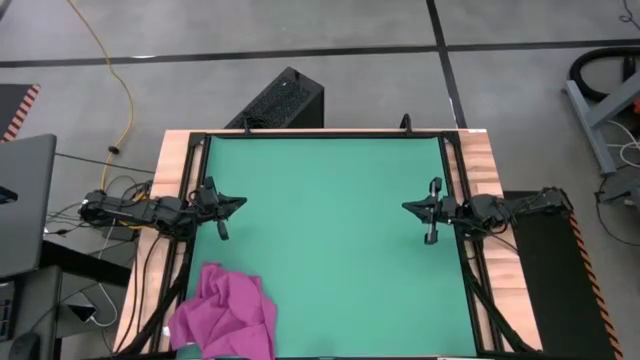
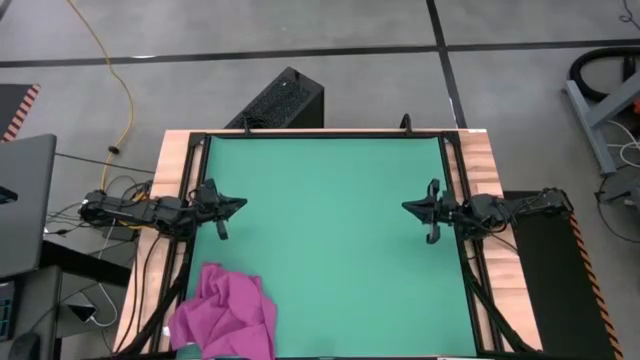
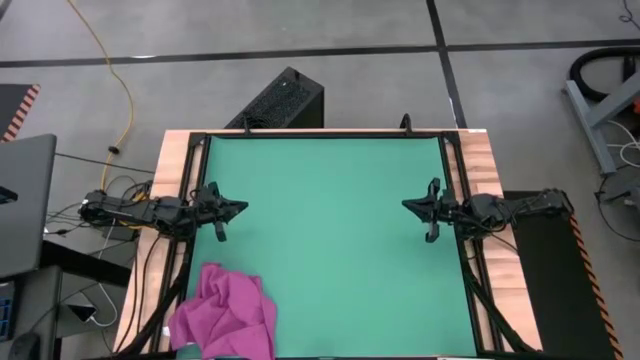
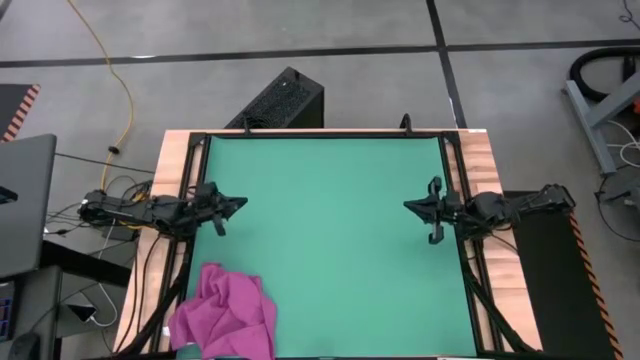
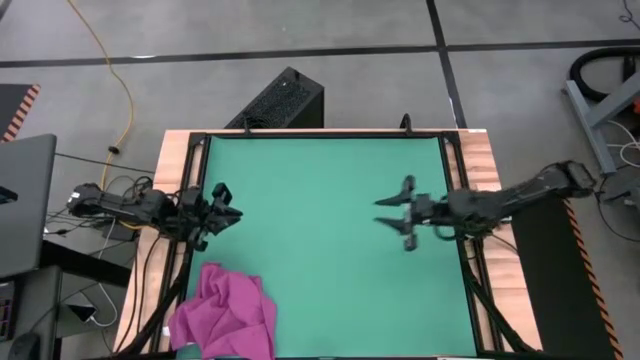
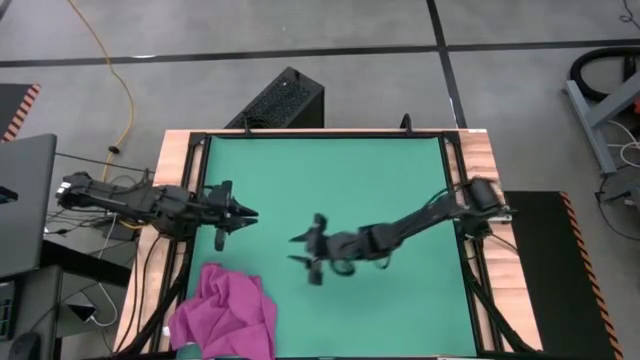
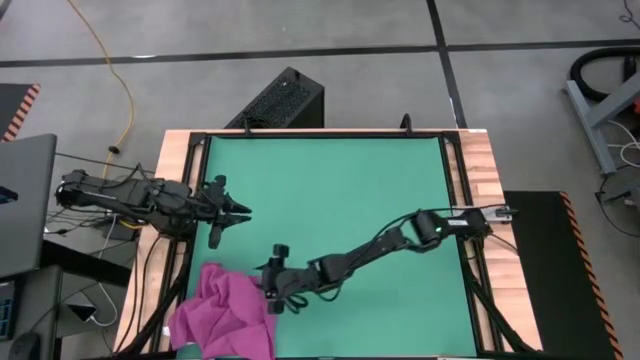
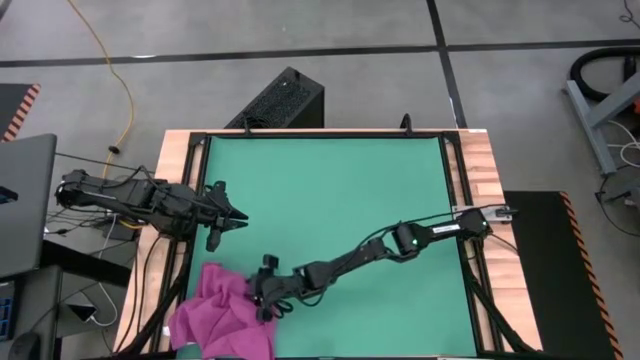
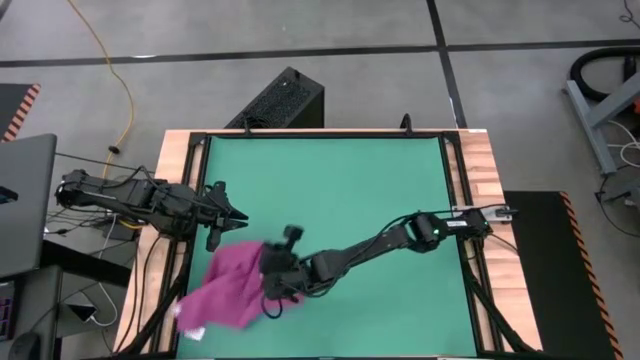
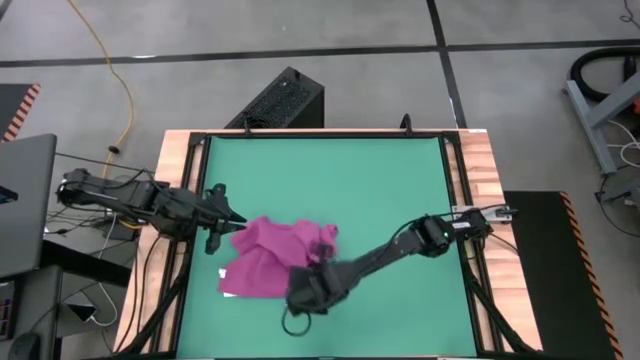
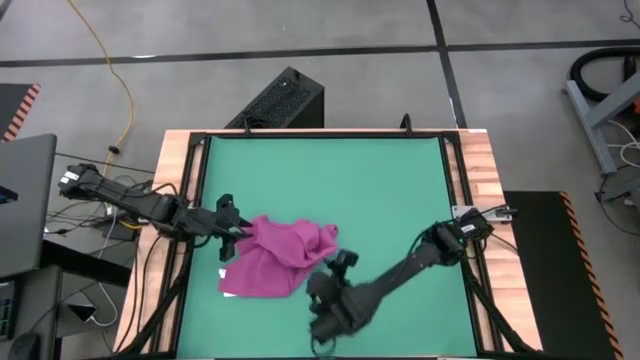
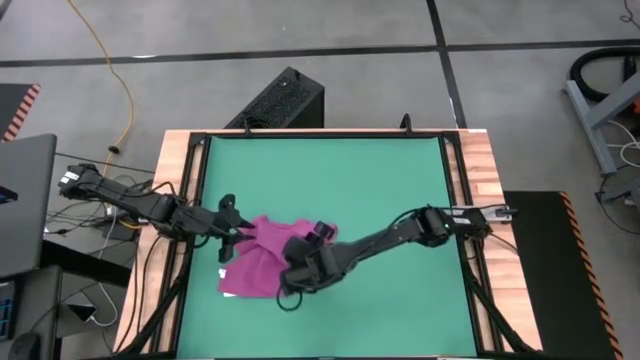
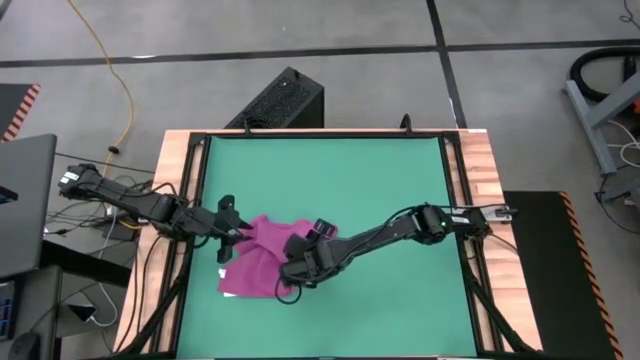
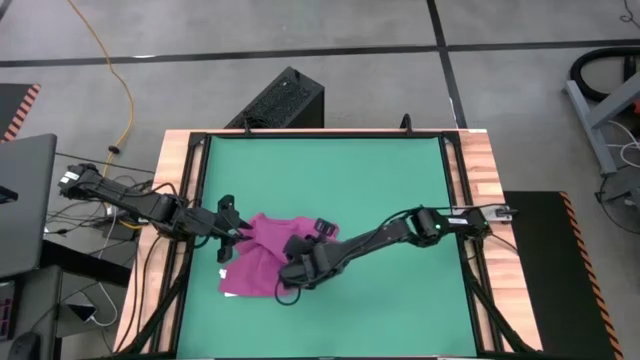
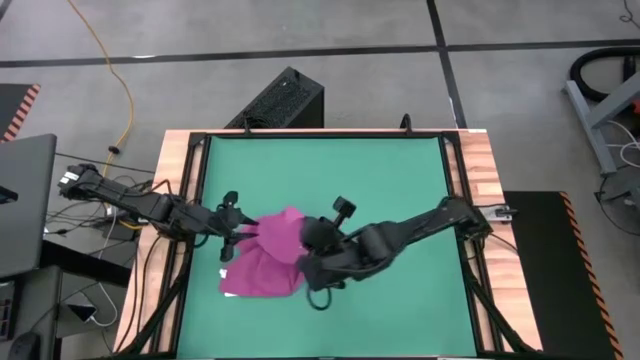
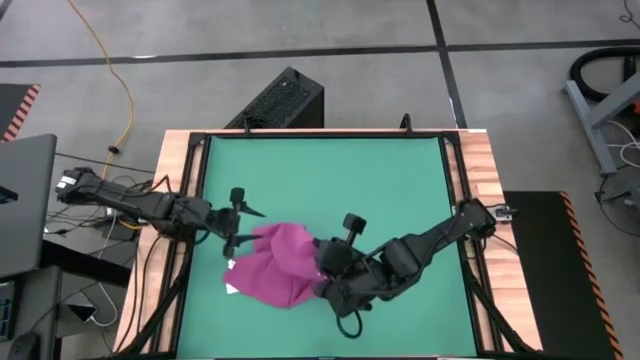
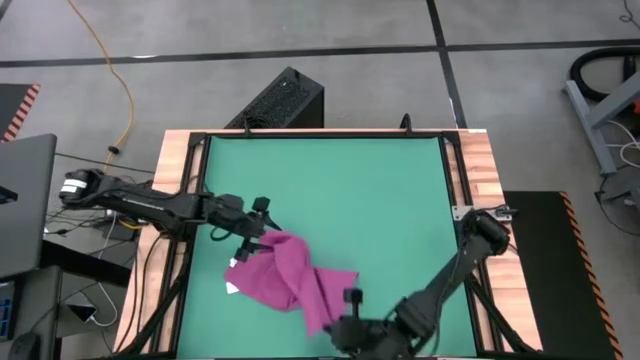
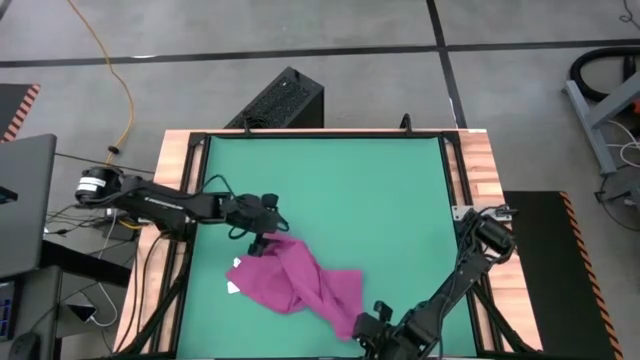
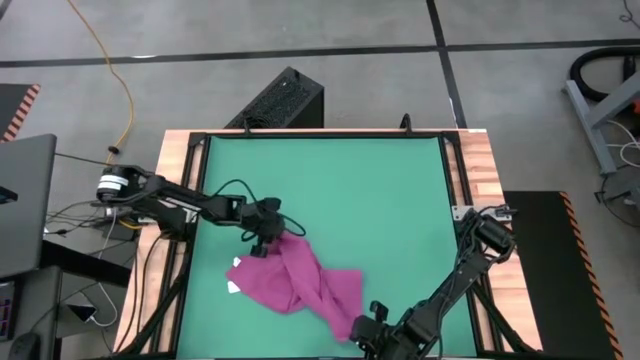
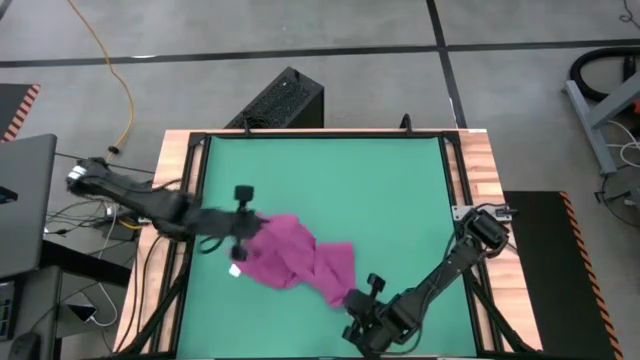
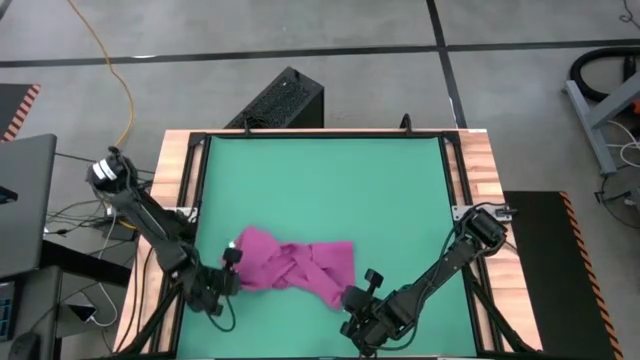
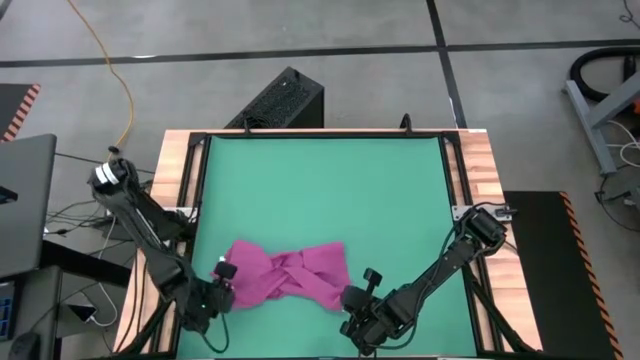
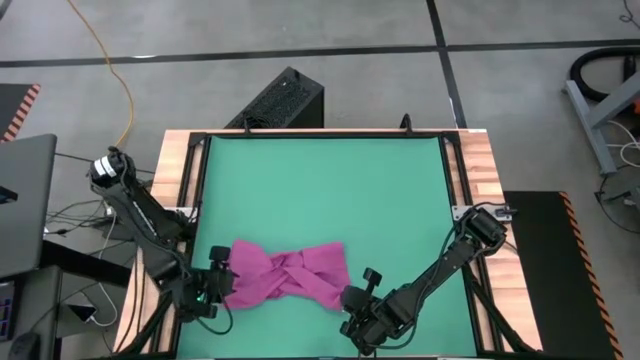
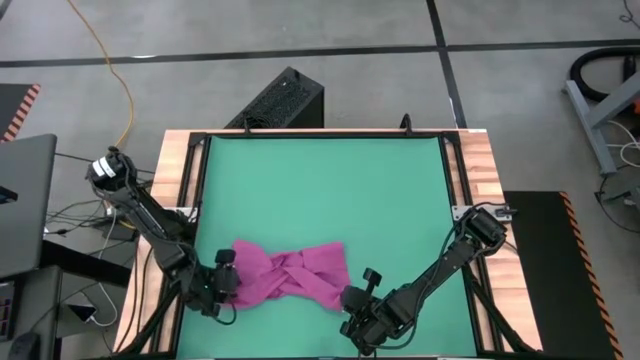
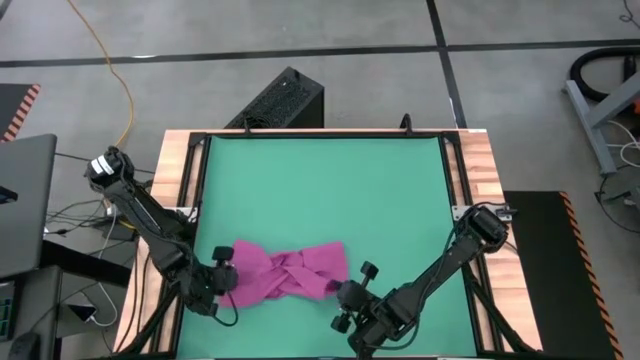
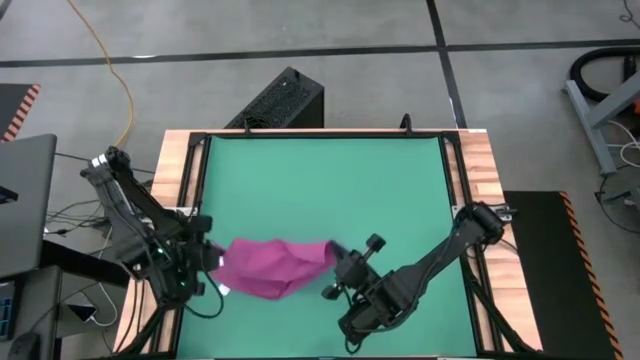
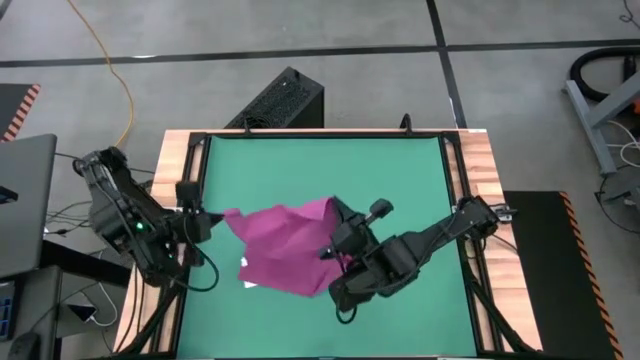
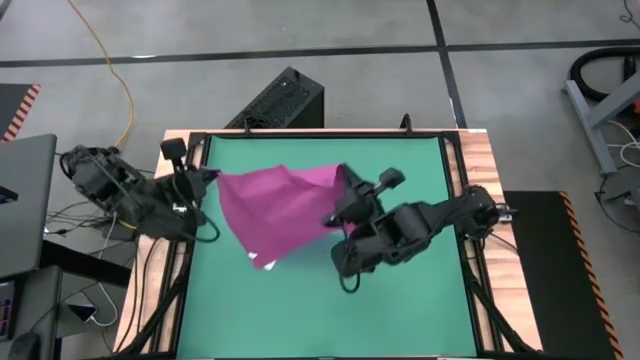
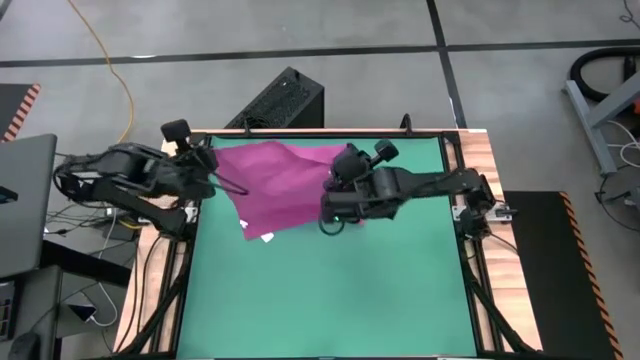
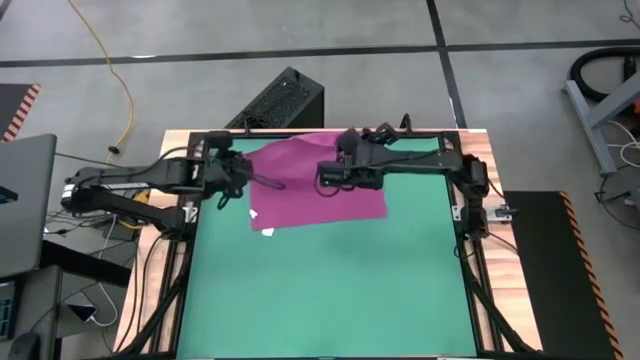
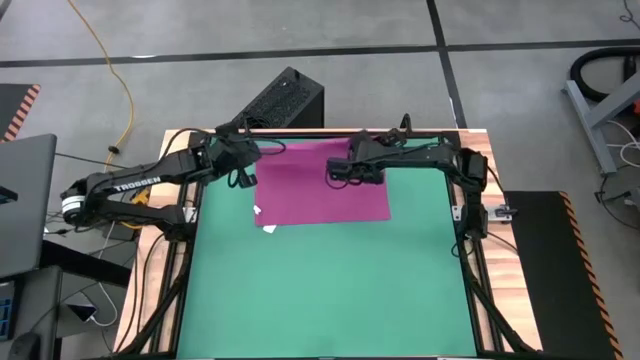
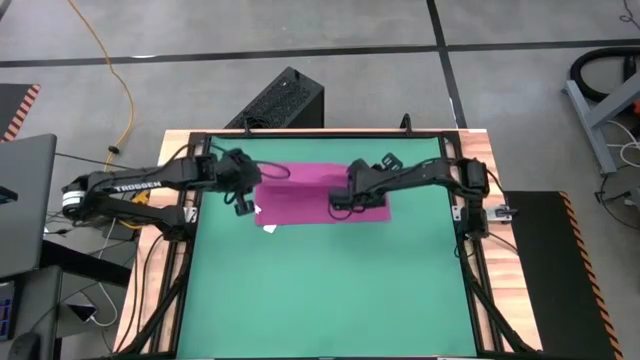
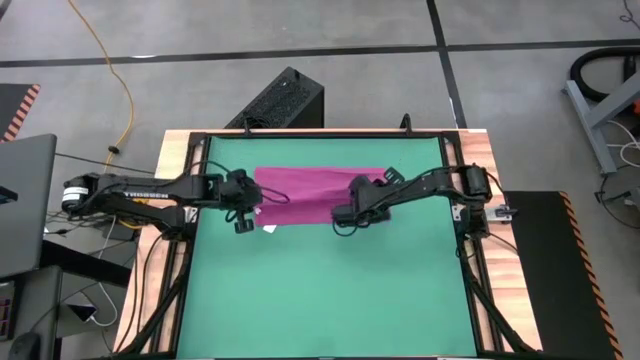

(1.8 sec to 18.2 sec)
Task: Roll towel into tight, uniform cylinder
Fold the pink towel
